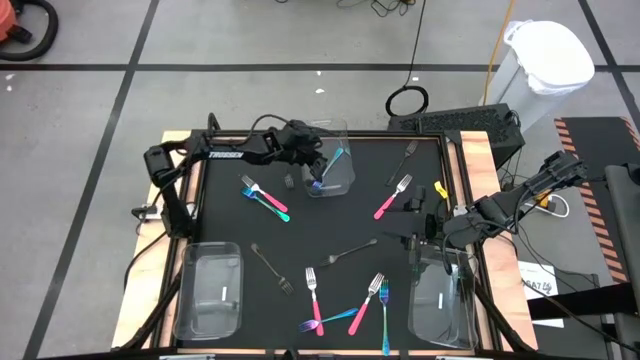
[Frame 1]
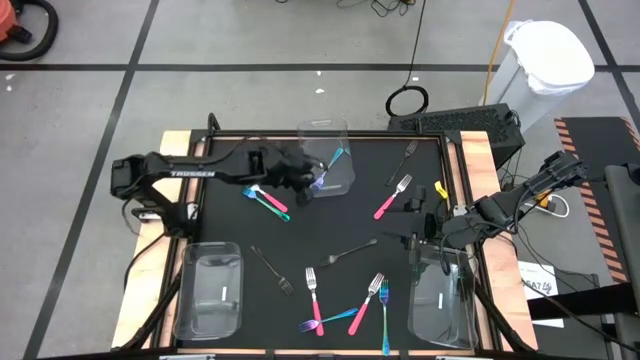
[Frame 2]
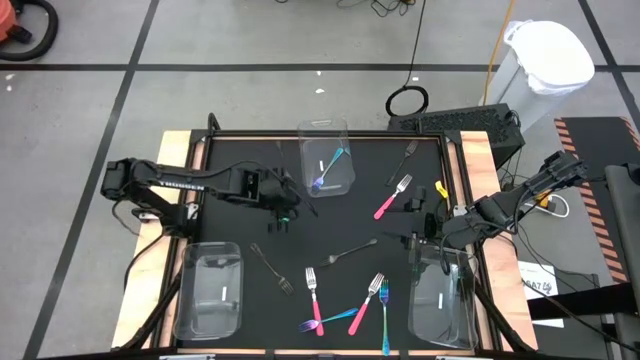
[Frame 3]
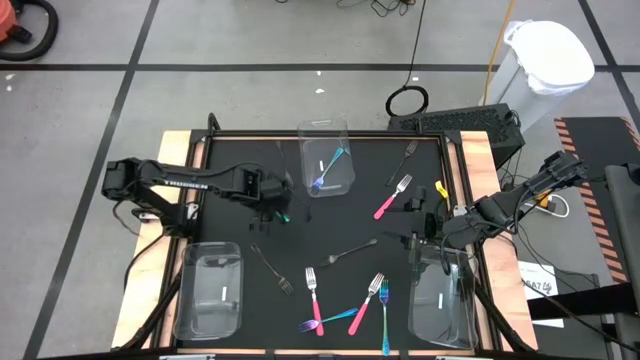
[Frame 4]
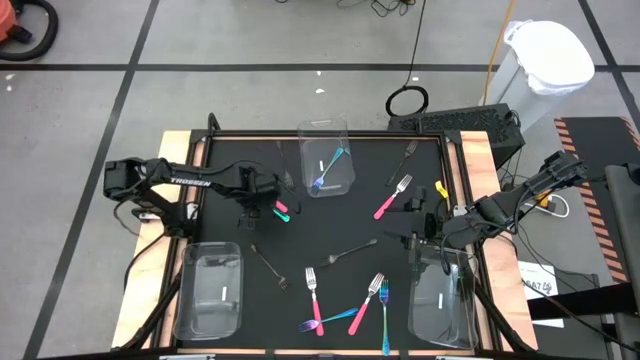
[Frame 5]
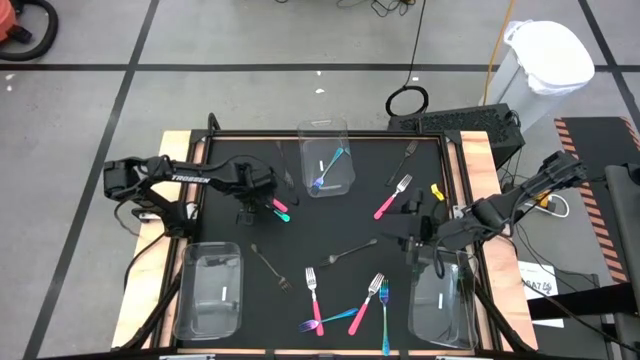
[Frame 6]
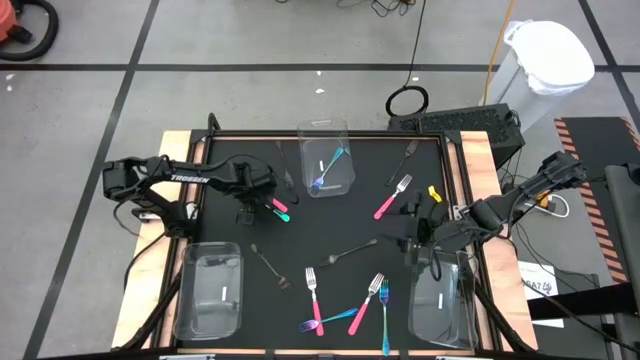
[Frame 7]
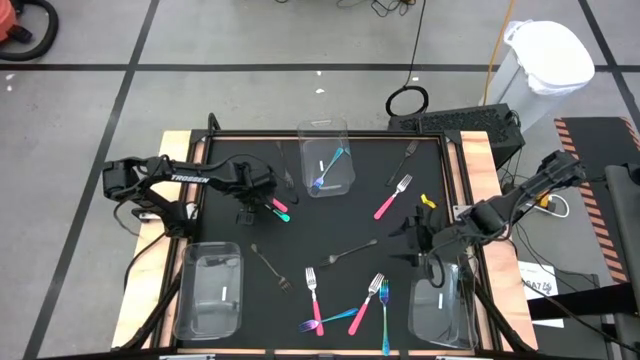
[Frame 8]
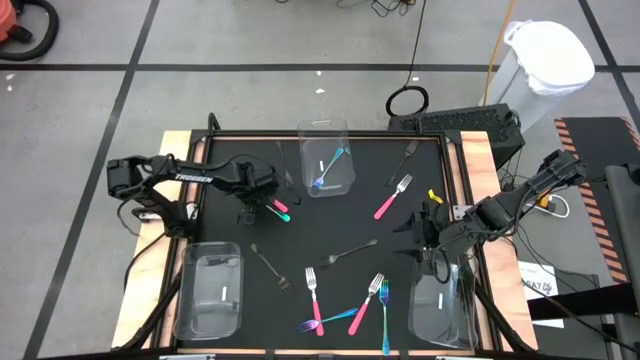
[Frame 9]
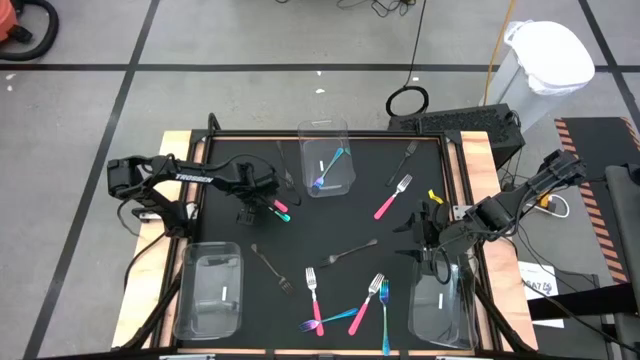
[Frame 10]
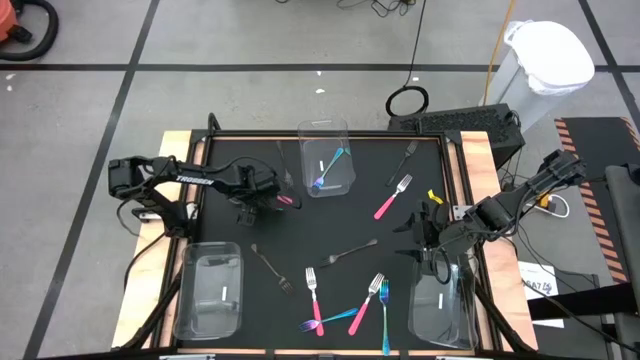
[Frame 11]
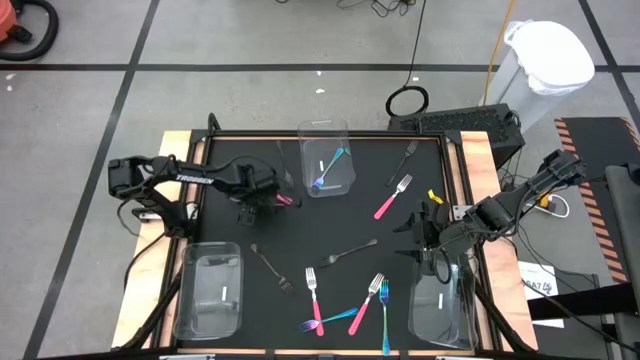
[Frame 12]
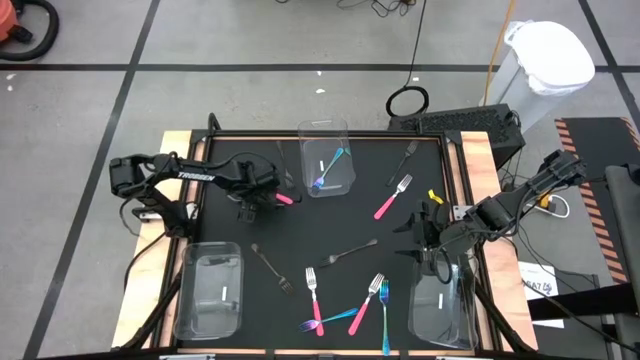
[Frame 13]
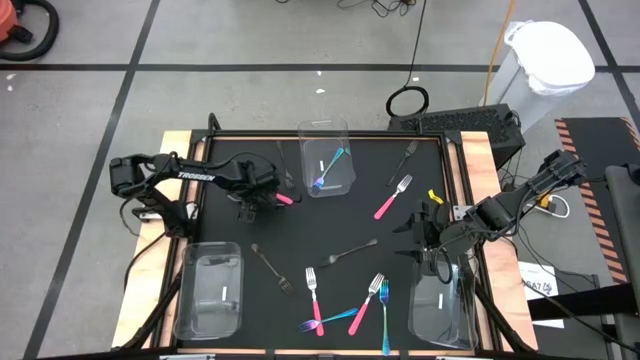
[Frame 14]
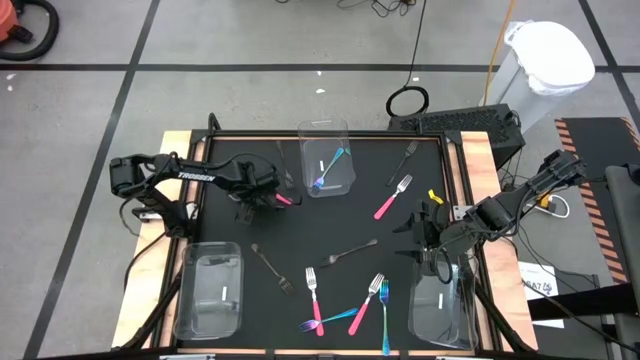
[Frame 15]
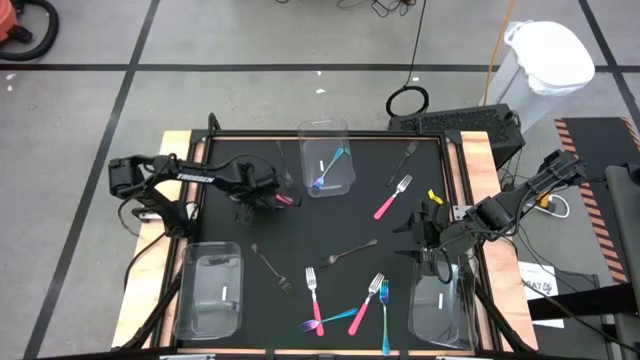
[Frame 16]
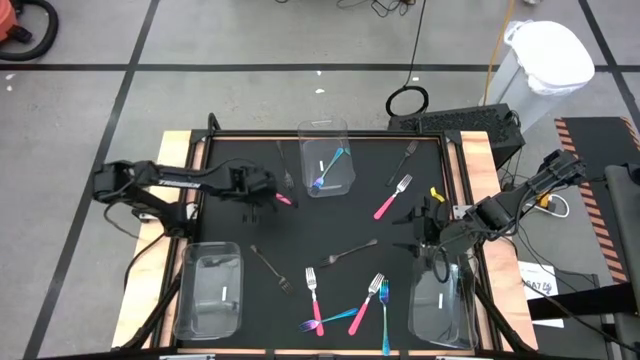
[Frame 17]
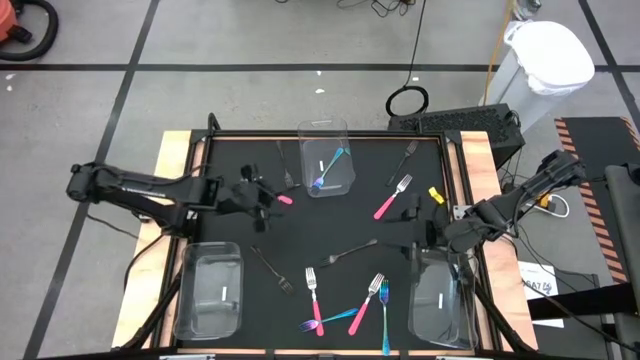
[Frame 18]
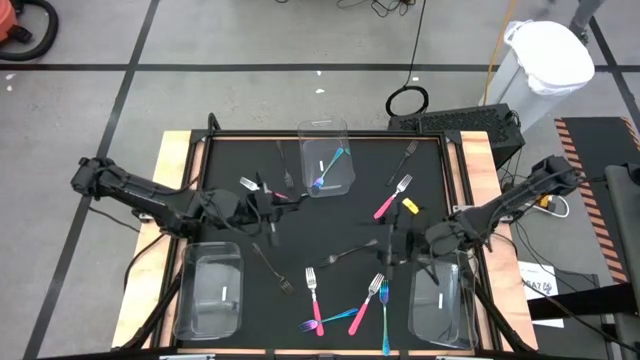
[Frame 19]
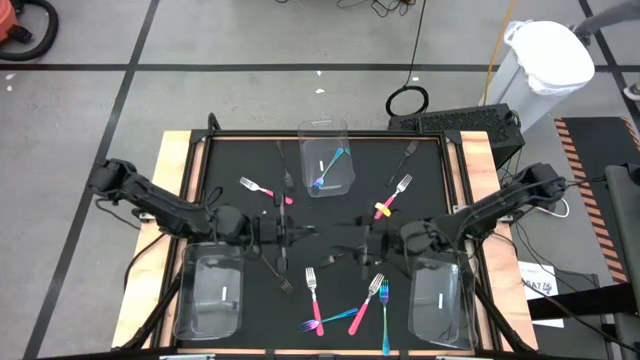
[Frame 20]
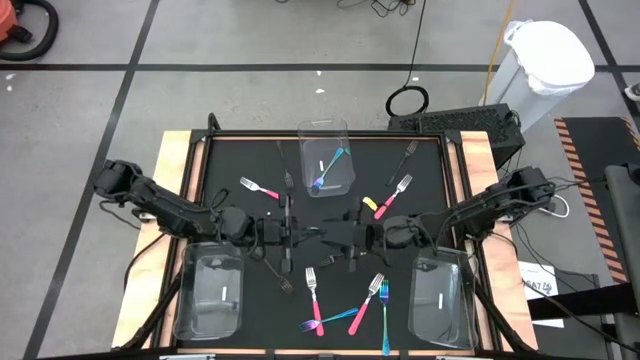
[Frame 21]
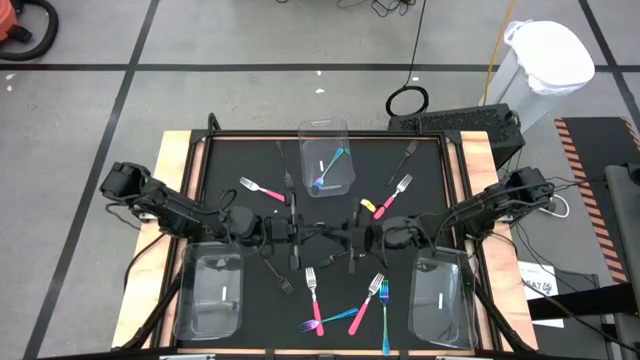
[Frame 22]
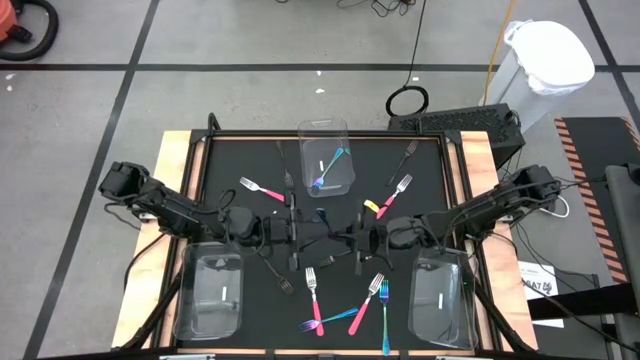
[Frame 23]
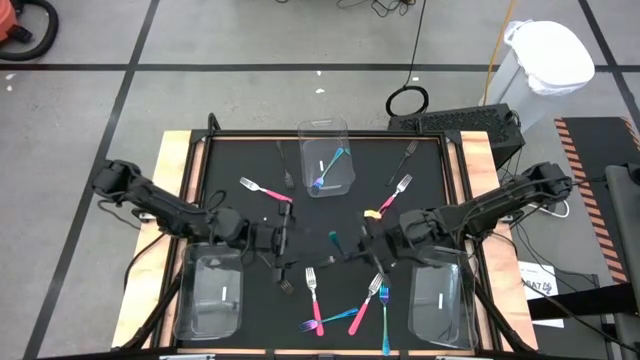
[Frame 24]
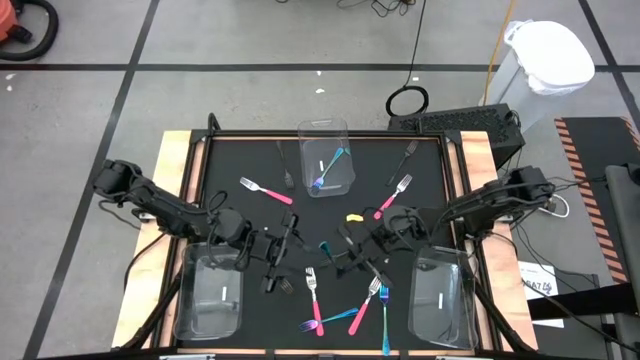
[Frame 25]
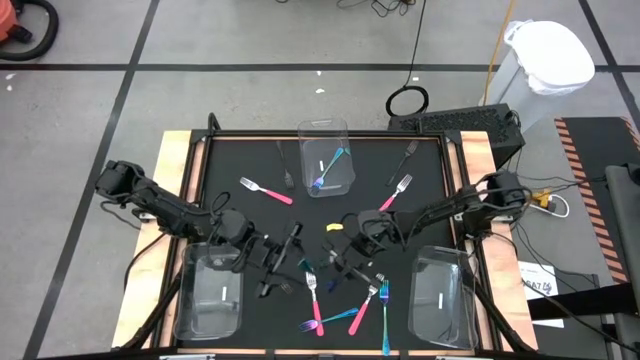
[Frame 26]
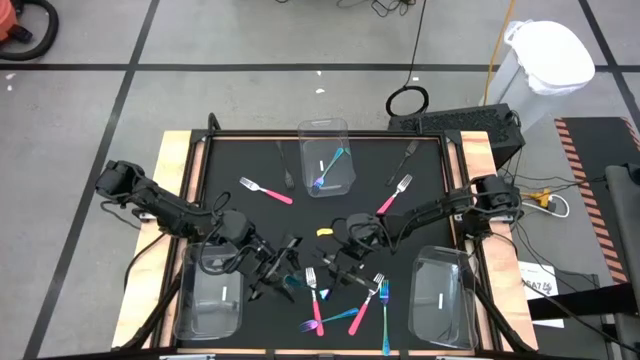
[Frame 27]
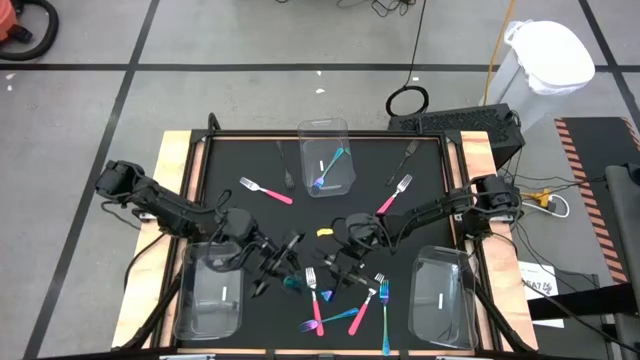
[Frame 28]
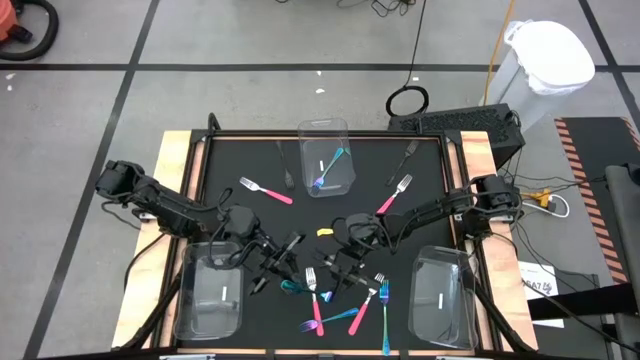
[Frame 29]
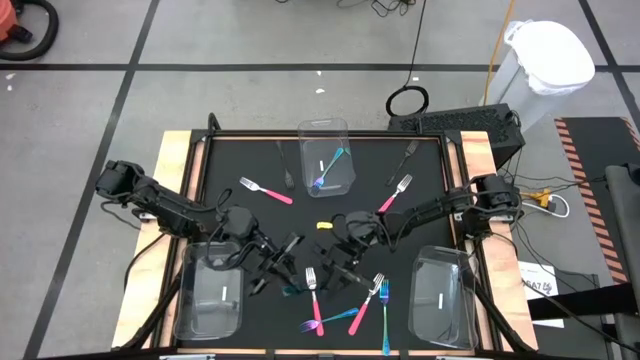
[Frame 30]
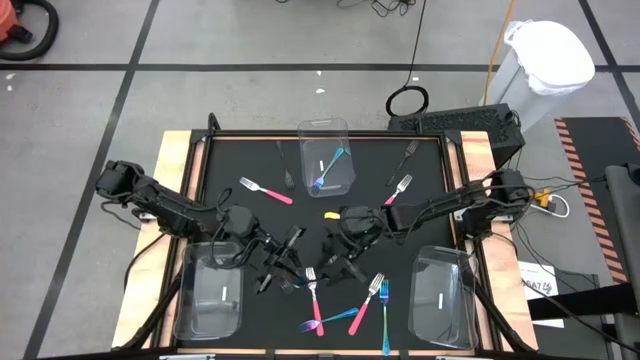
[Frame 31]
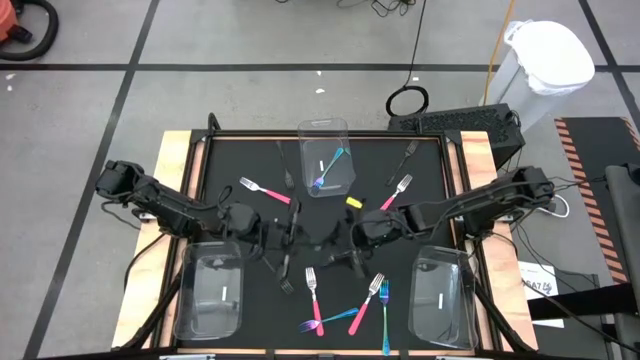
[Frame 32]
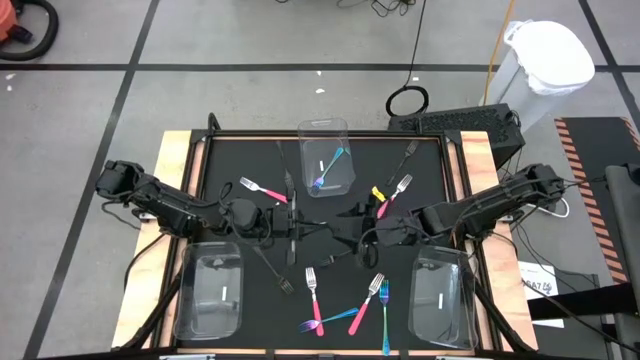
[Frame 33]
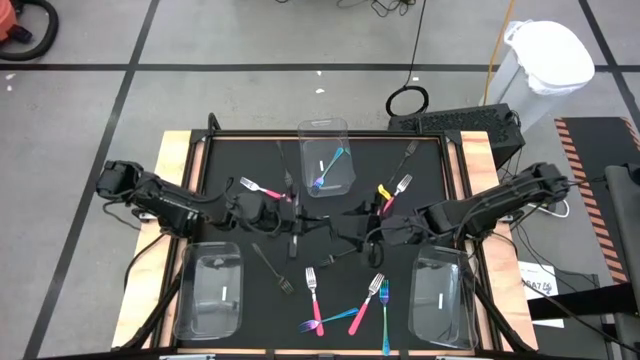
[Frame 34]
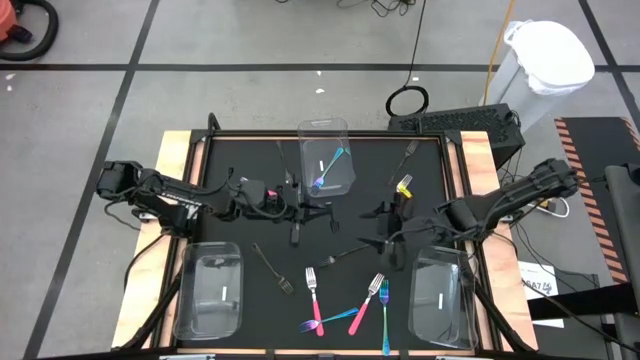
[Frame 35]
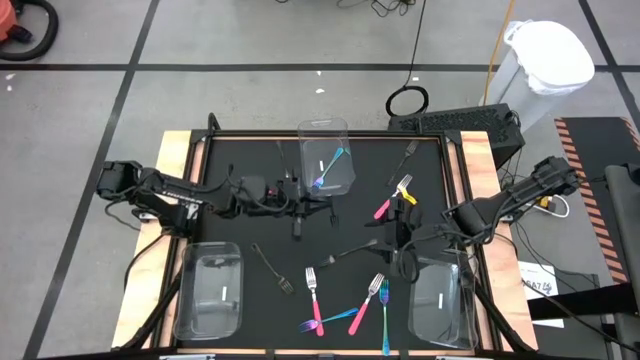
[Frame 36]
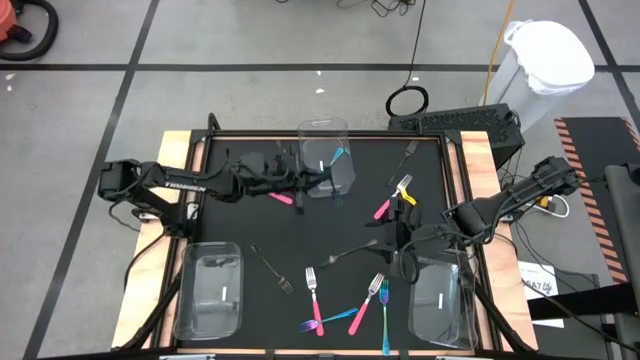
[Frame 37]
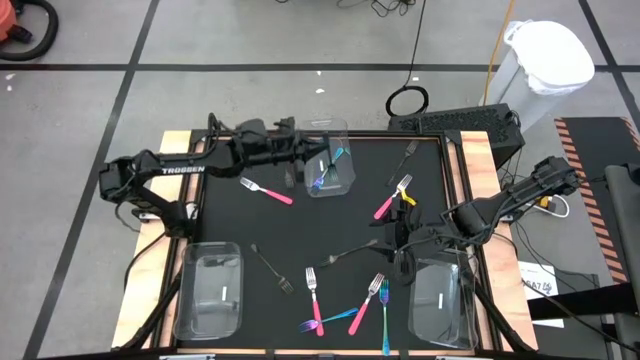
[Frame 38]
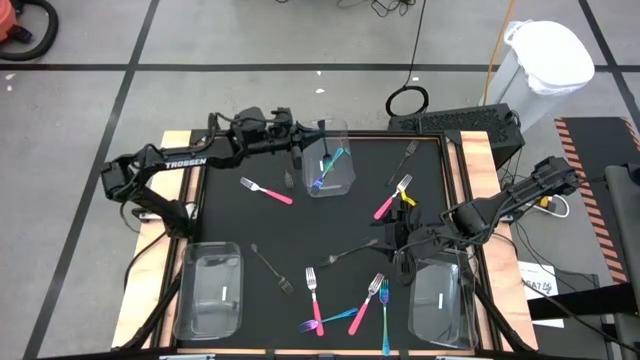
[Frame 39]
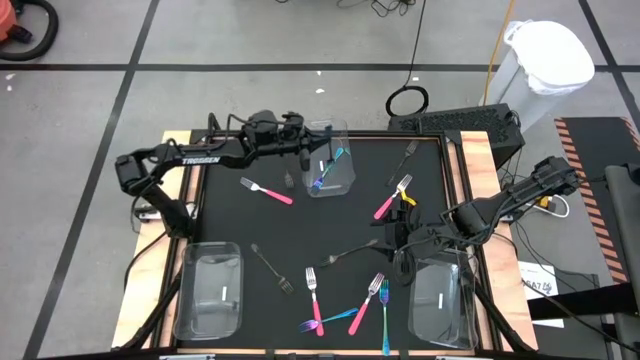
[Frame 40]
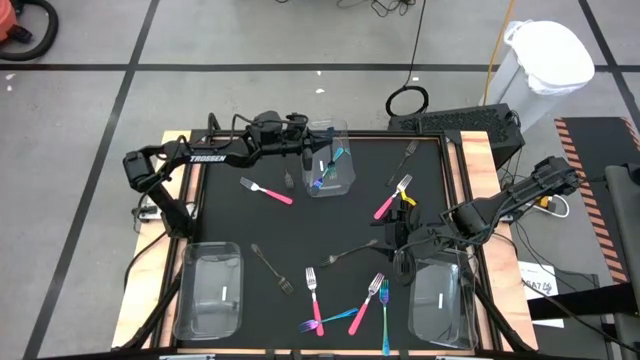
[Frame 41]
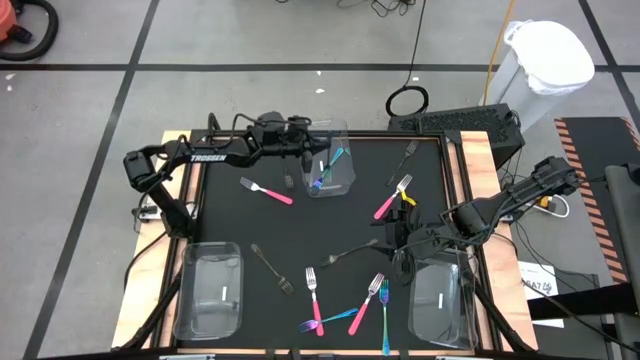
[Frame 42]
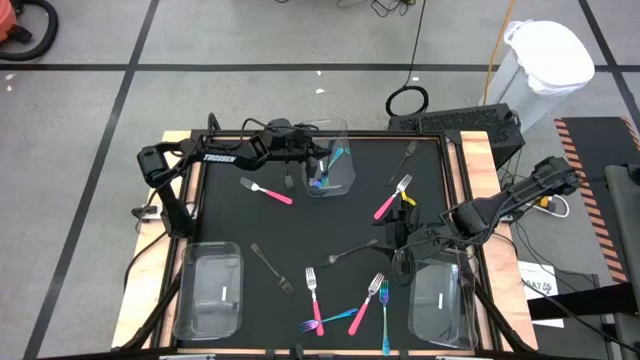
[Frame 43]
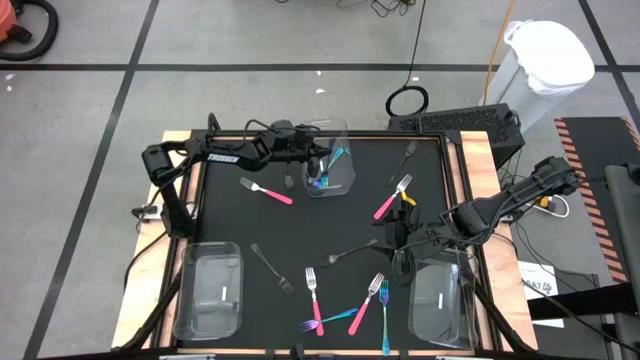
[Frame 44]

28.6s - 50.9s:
Task: Sort silverware by color (type)
Put the blue fork into the top transparent bin
